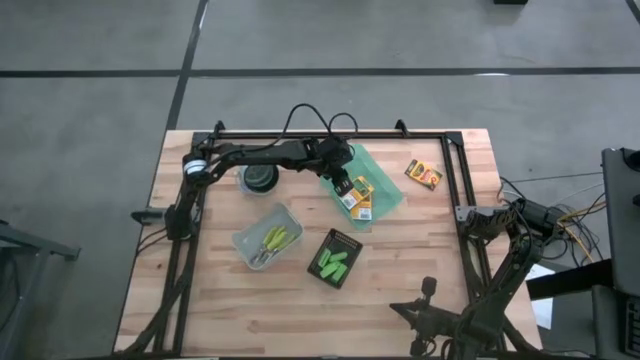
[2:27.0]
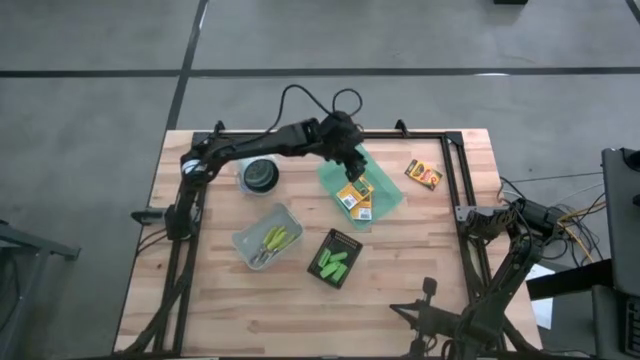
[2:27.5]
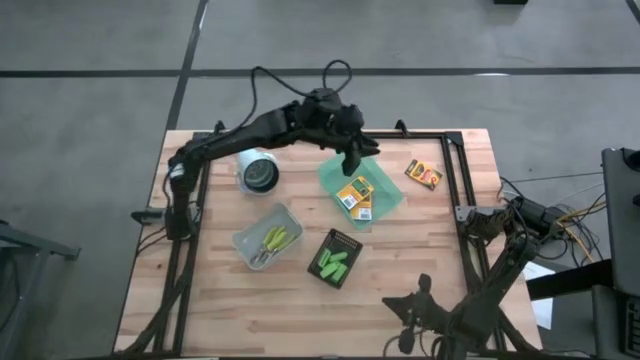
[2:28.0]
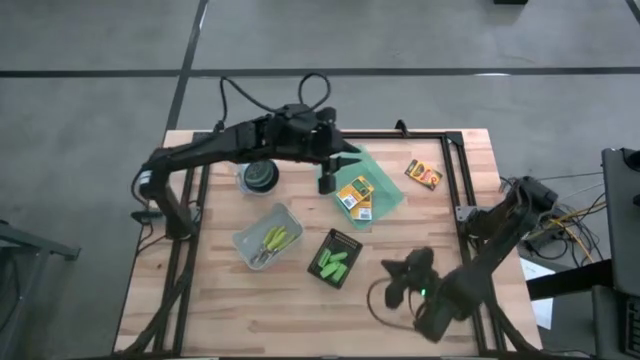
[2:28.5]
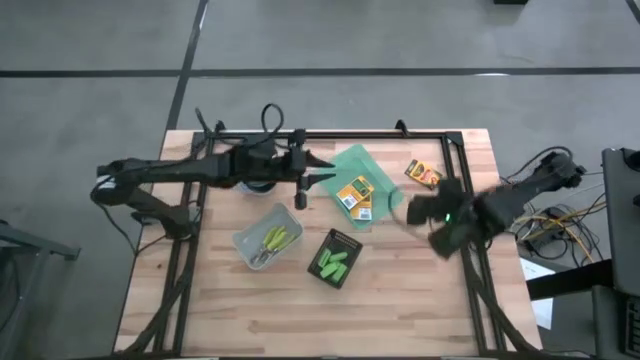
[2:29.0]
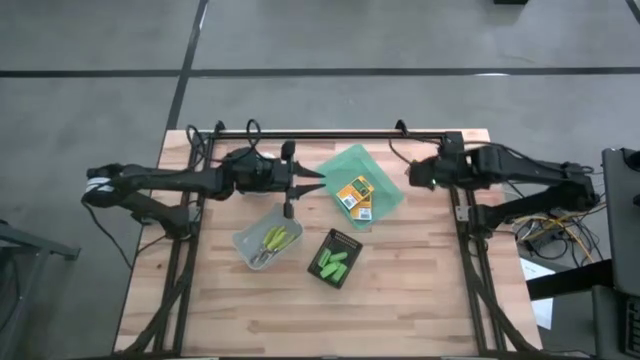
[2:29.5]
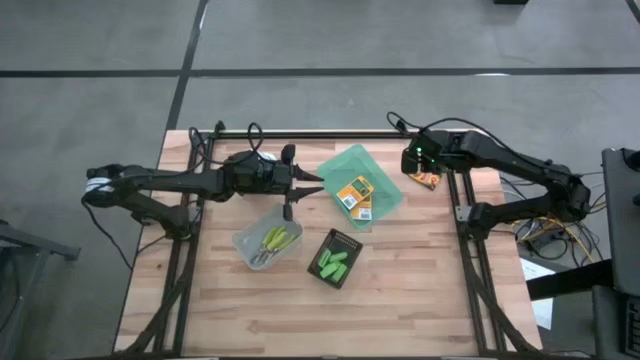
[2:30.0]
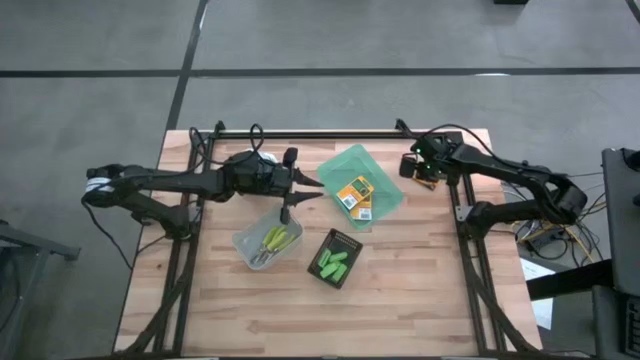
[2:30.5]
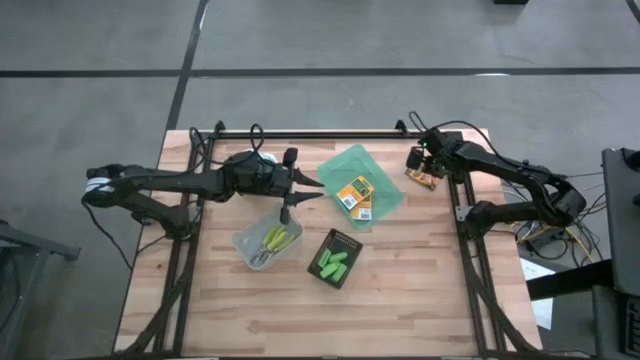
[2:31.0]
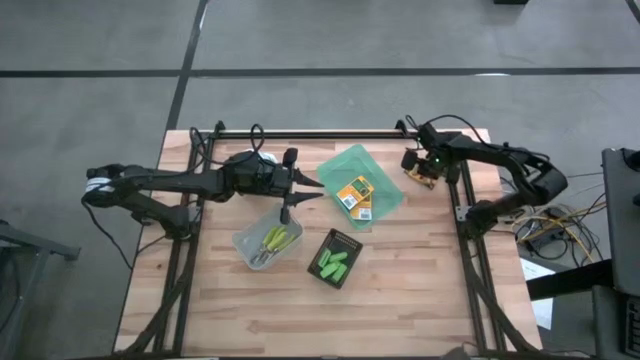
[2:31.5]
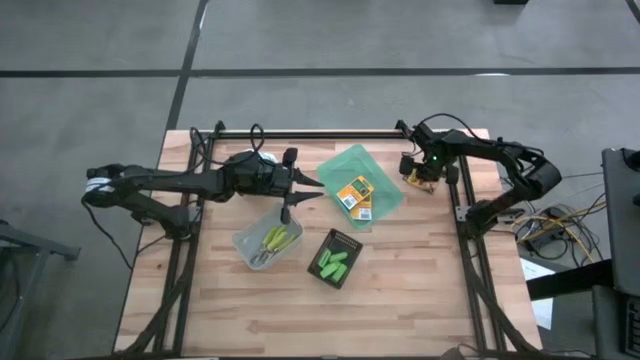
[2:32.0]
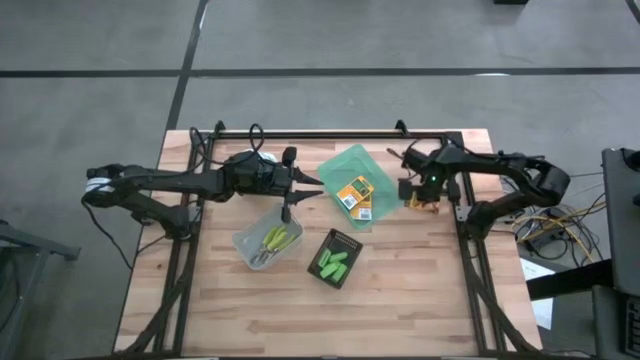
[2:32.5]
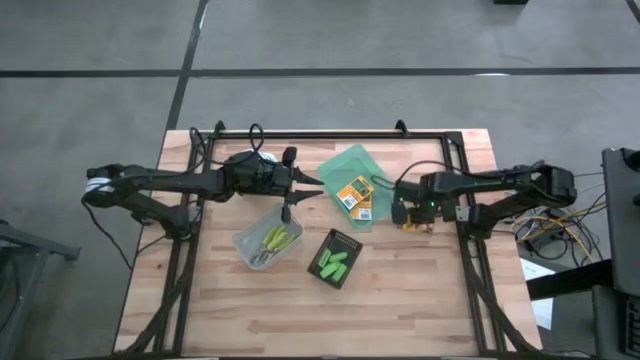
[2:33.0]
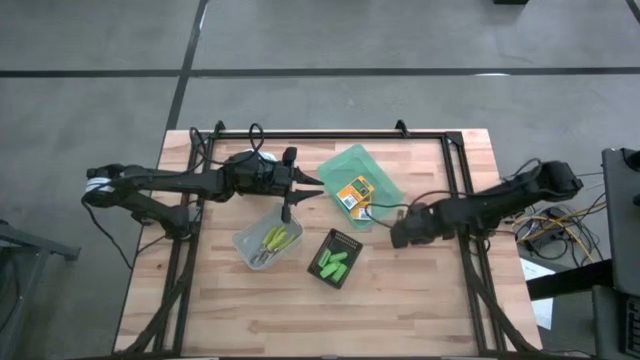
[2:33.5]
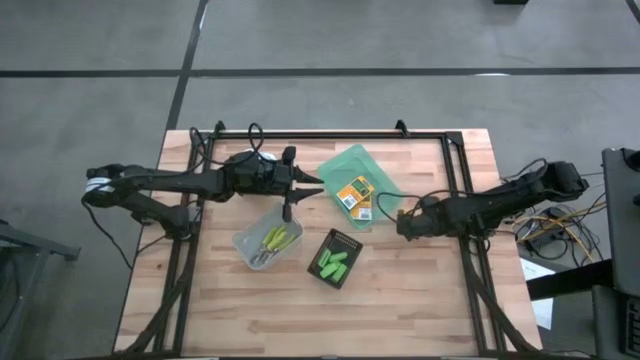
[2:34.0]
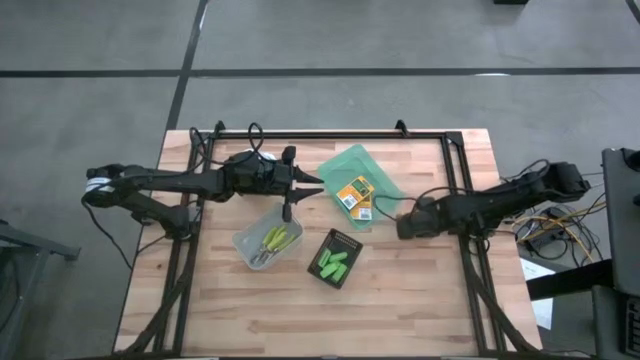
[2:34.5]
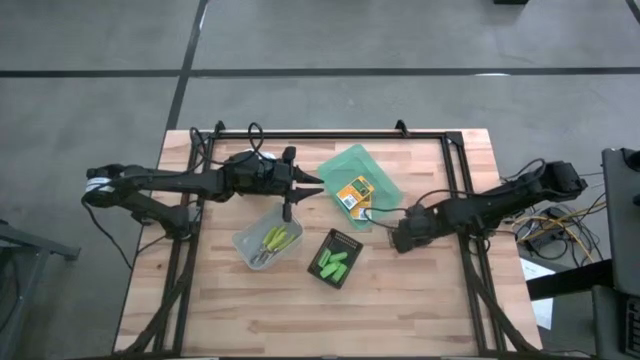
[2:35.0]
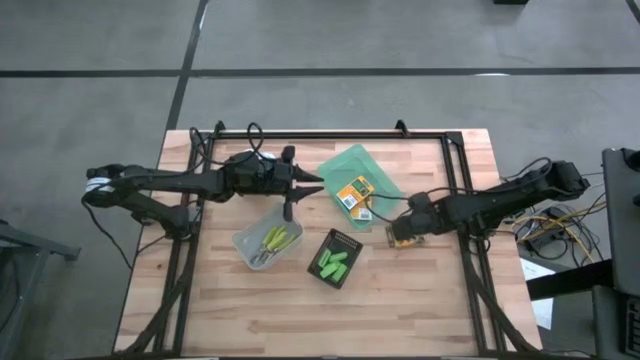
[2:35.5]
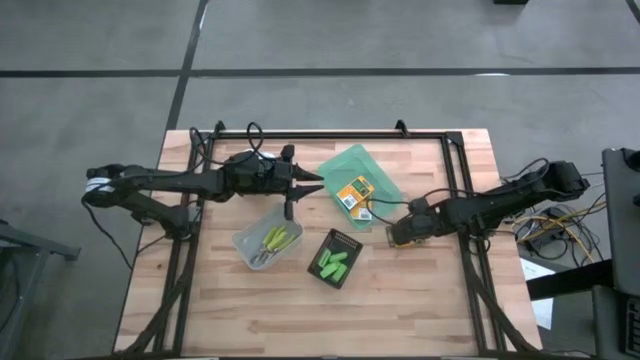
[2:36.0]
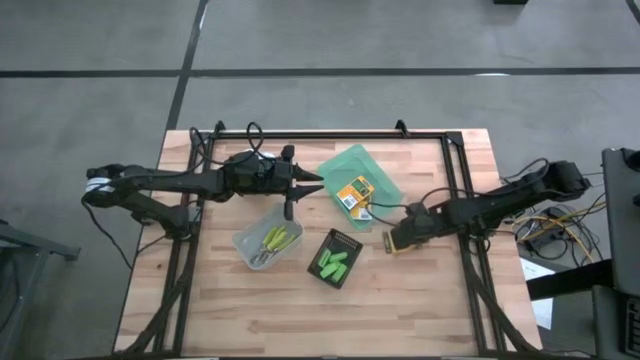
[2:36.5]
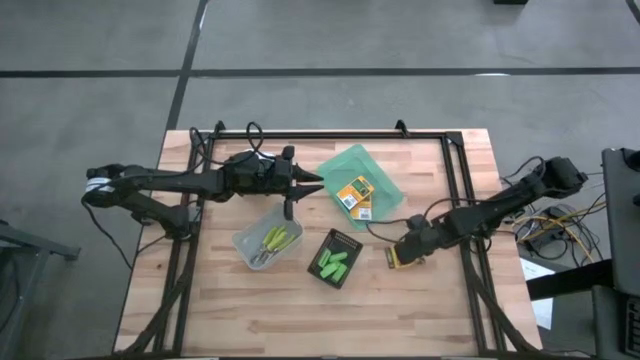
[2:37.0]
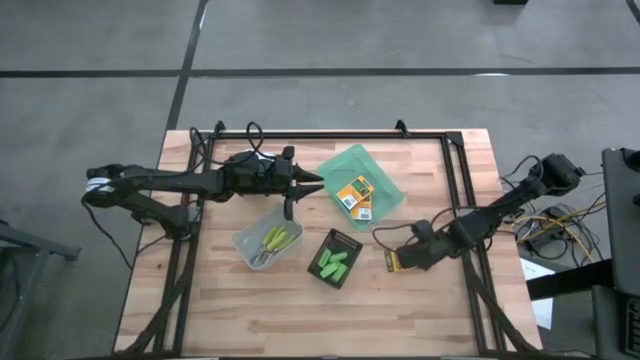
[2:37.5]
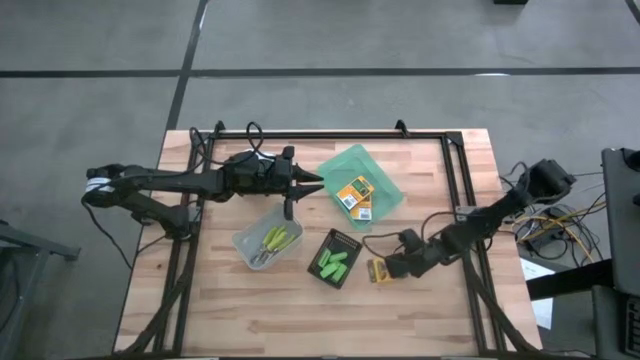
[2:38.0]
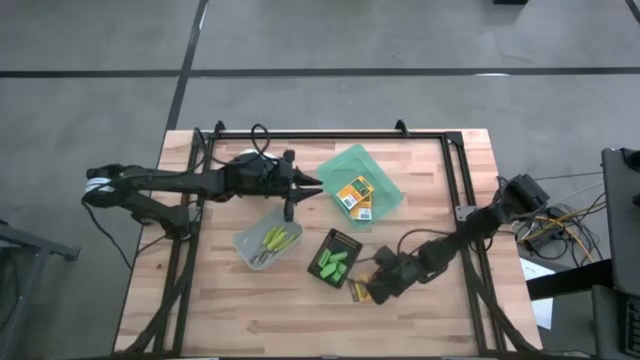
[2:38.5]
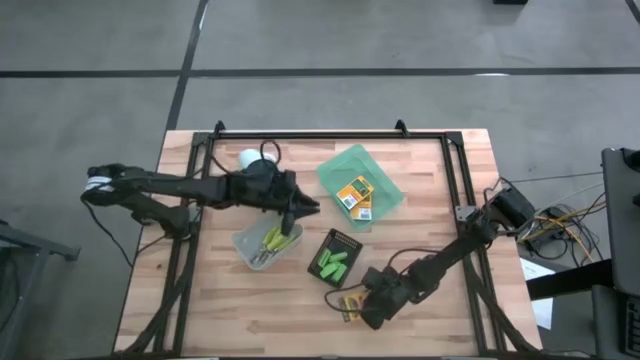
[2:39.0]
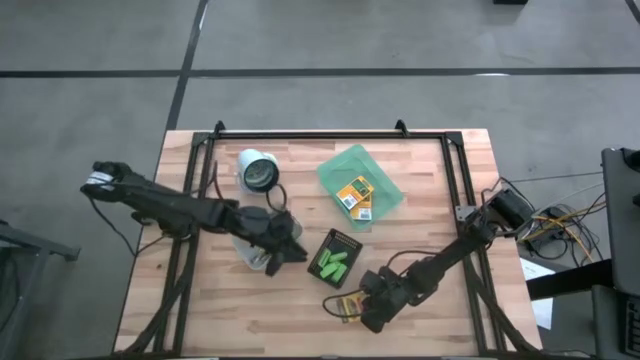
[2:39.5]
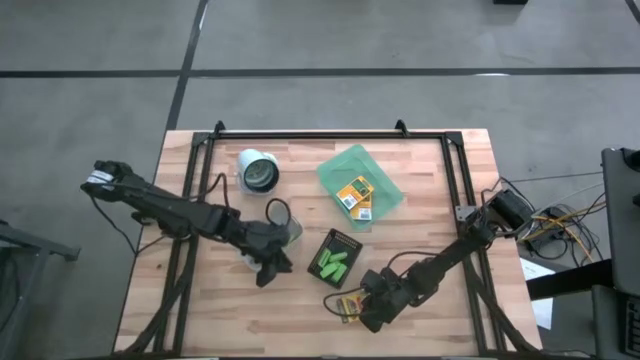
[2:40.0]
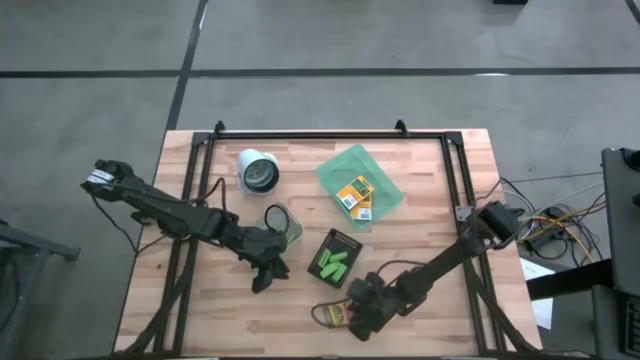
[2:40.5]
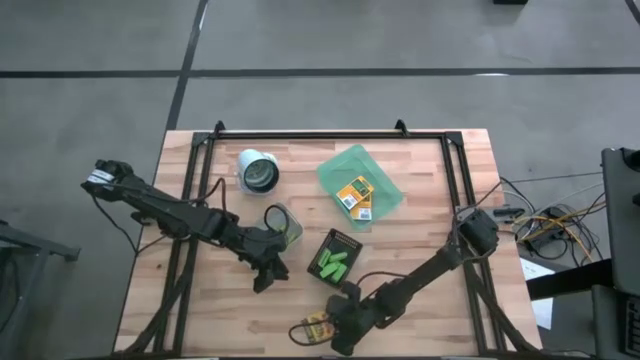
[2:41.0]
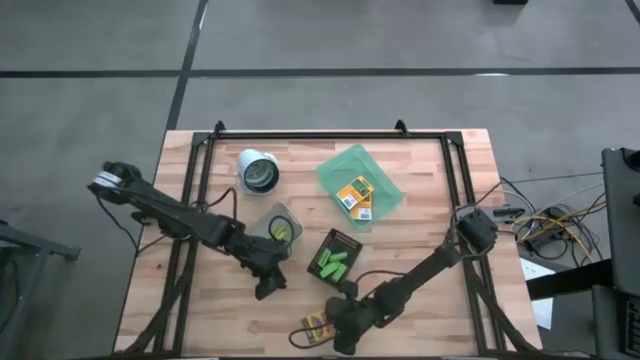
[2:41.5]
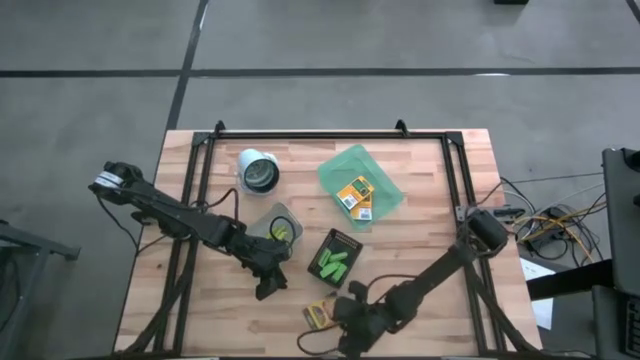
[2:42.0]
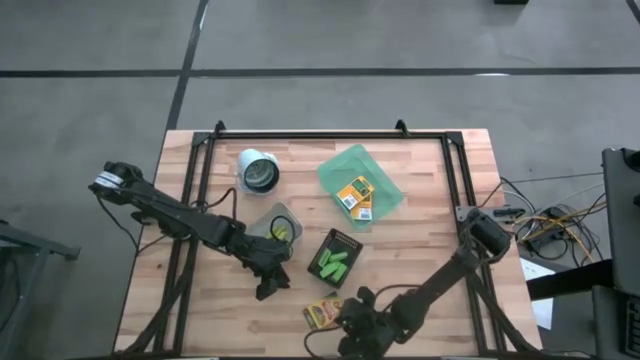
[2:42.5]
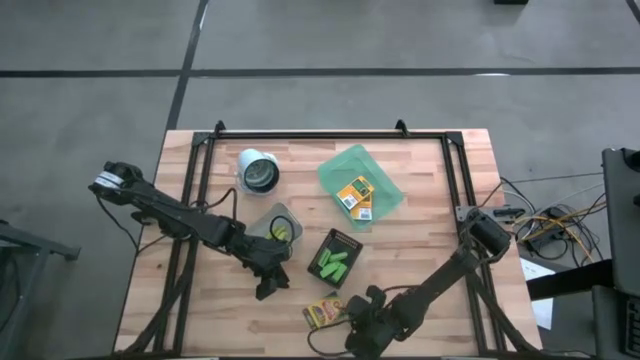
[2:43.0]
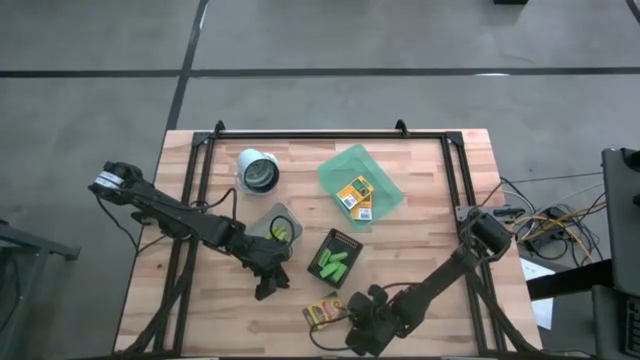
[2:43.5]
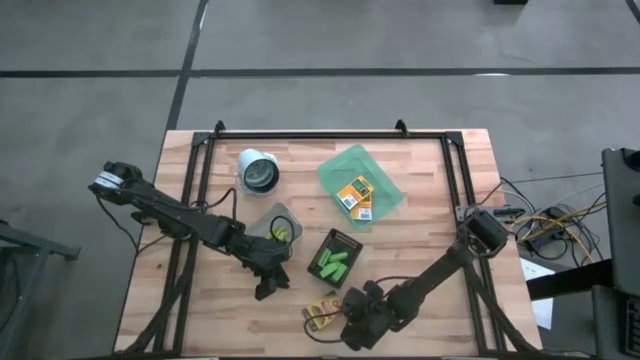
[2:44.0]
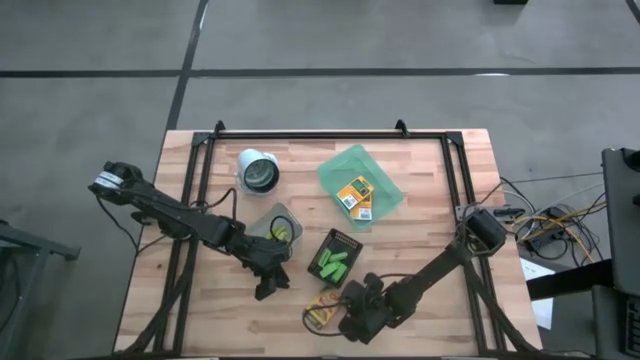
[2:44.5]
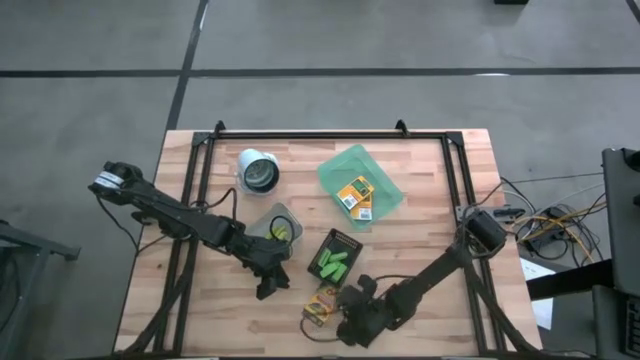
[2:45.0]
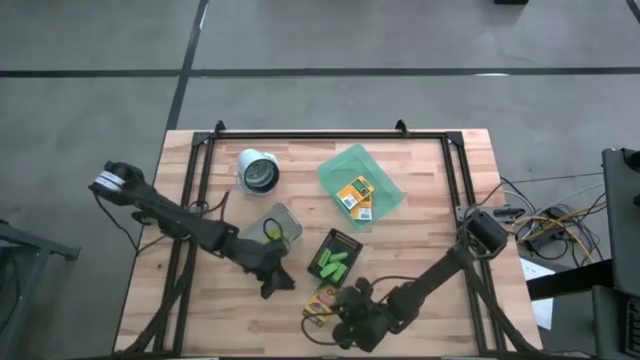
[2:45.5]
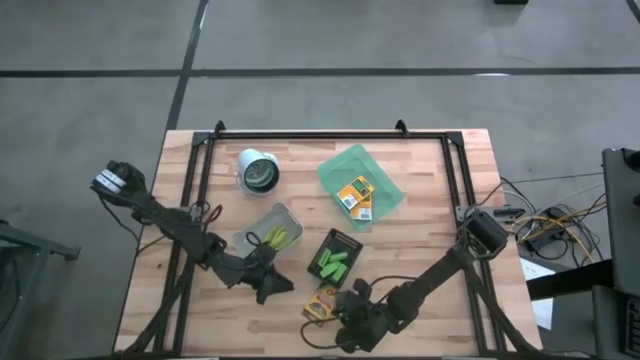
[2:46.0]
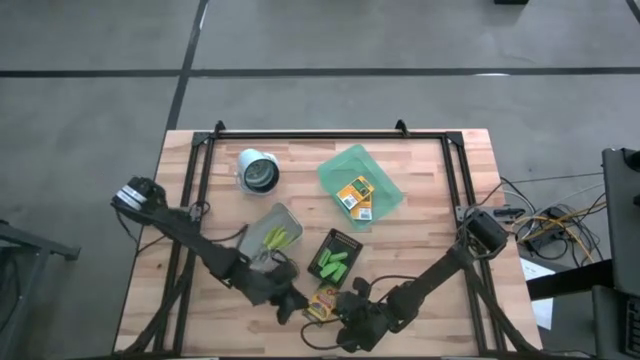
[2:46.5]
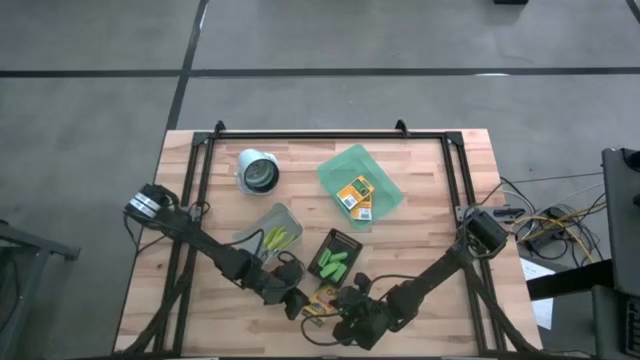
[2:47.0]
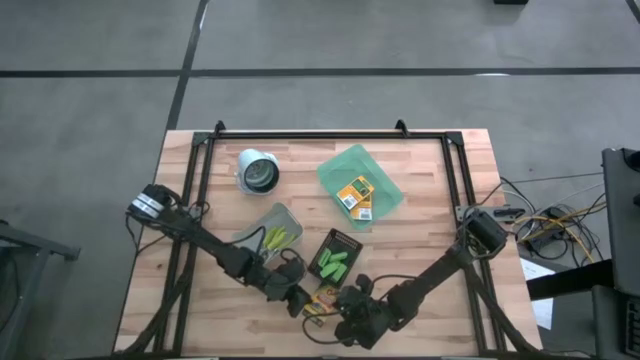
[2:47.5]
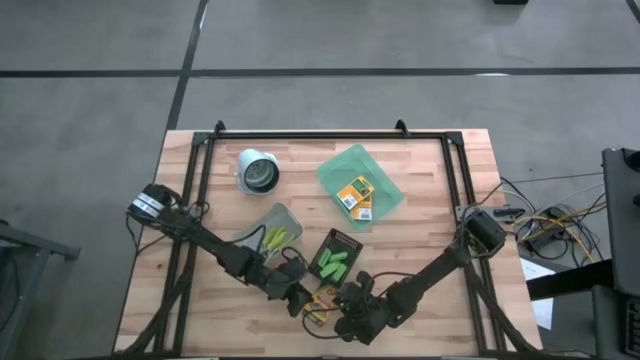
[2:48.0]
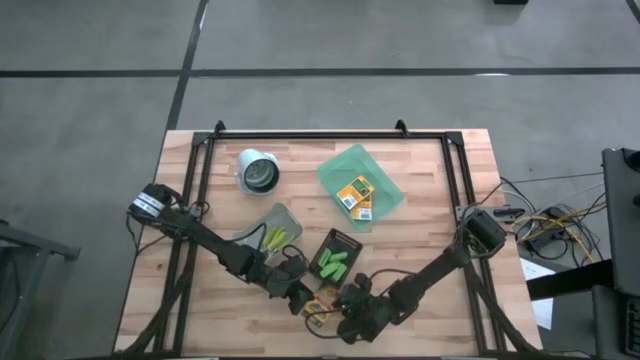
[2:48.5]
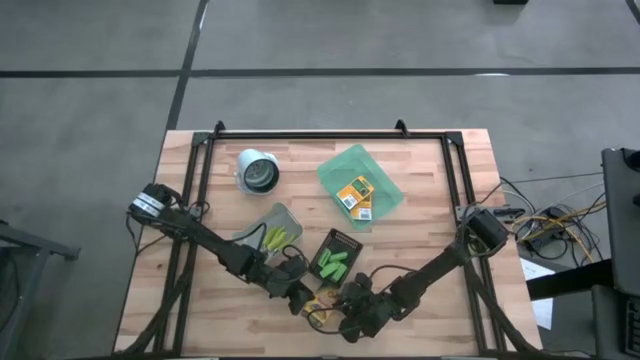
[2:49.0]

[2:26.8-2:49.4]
Task: Pick & Place School Supplies
Put the crayon box into the light green bin
